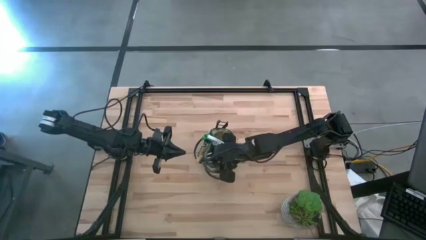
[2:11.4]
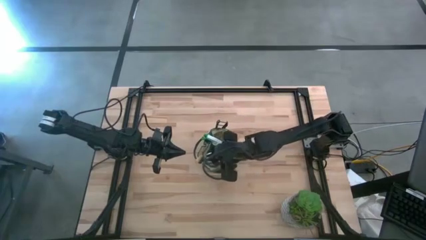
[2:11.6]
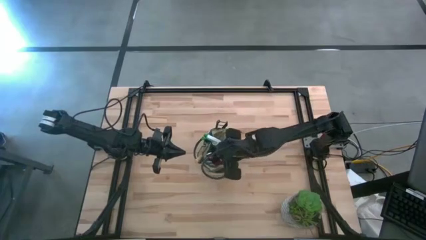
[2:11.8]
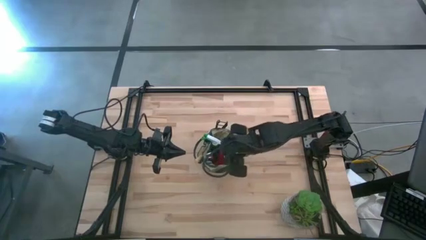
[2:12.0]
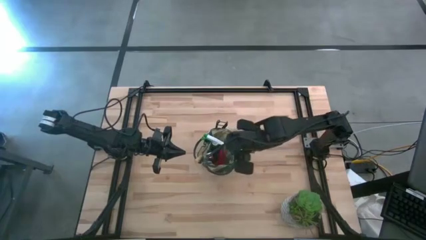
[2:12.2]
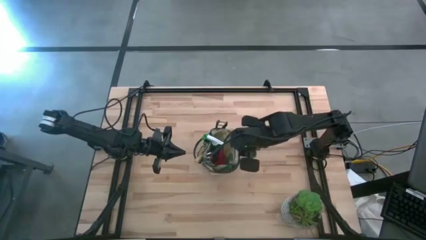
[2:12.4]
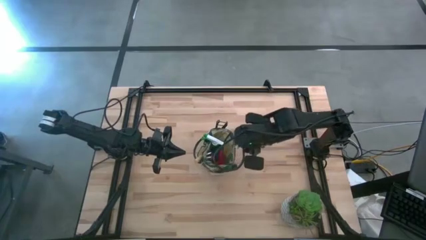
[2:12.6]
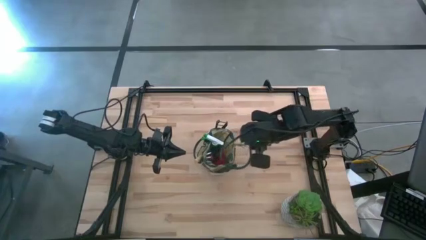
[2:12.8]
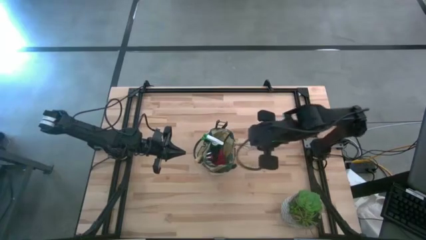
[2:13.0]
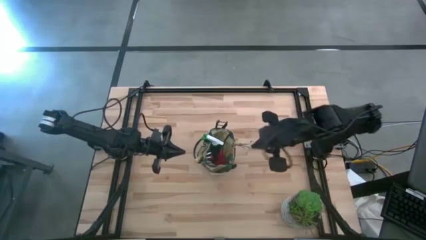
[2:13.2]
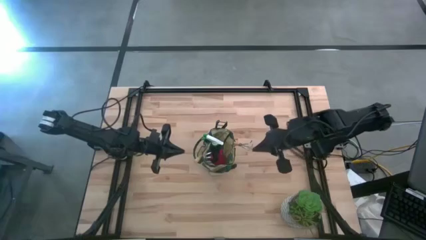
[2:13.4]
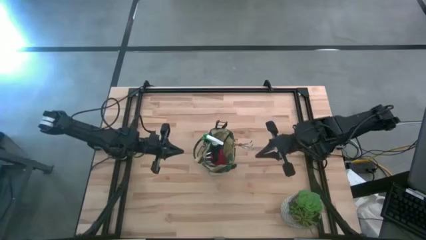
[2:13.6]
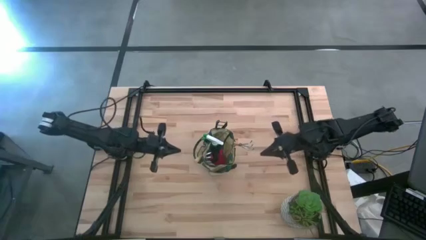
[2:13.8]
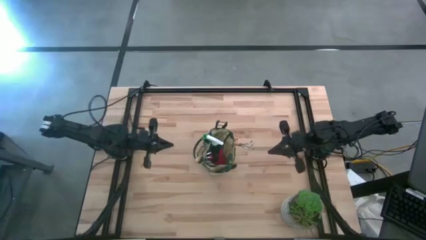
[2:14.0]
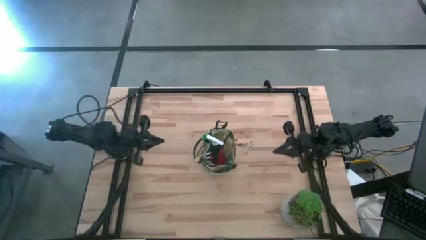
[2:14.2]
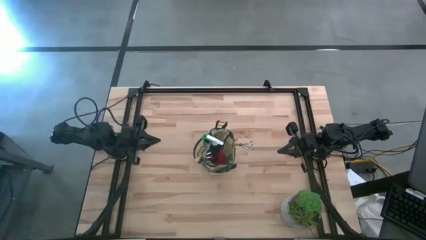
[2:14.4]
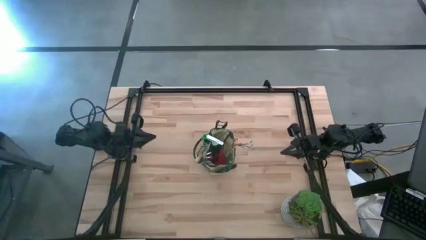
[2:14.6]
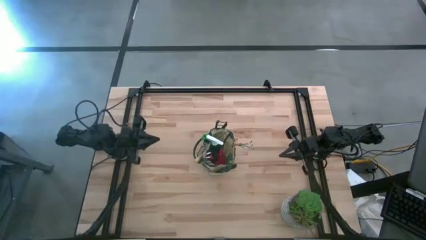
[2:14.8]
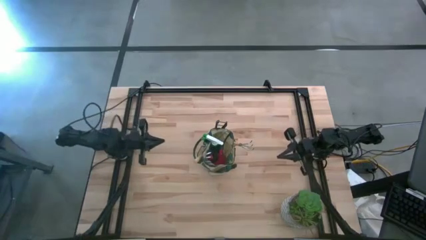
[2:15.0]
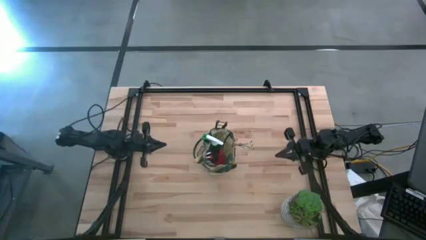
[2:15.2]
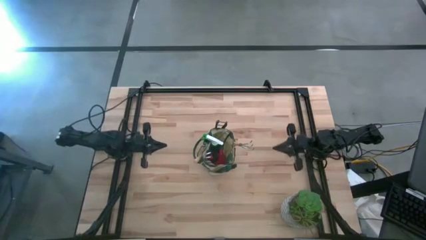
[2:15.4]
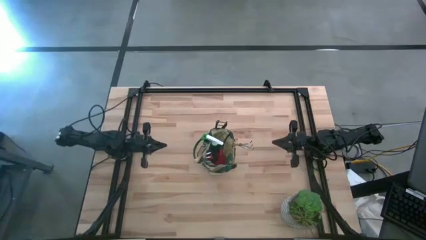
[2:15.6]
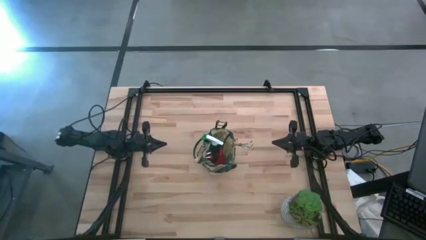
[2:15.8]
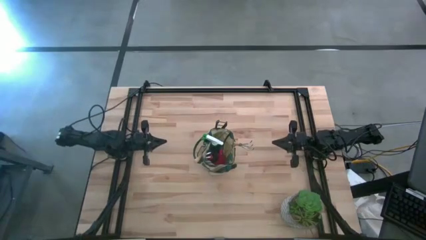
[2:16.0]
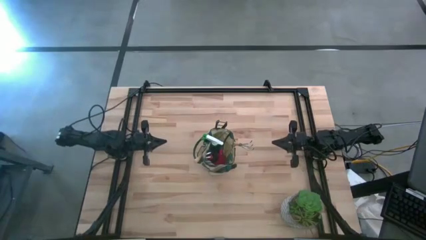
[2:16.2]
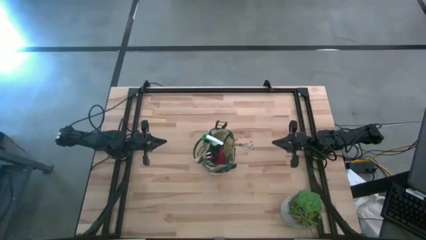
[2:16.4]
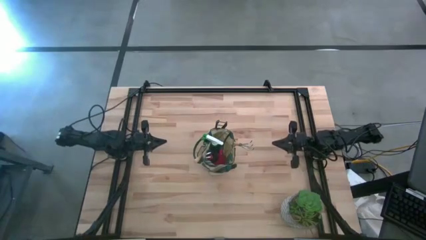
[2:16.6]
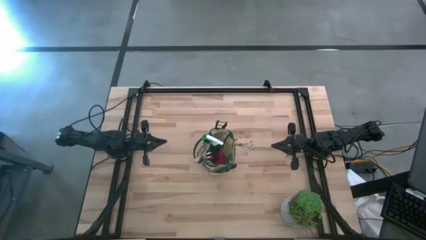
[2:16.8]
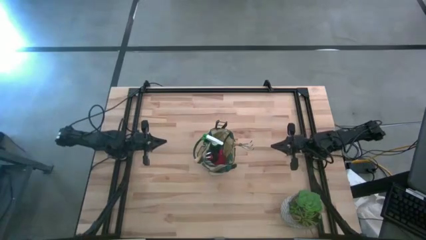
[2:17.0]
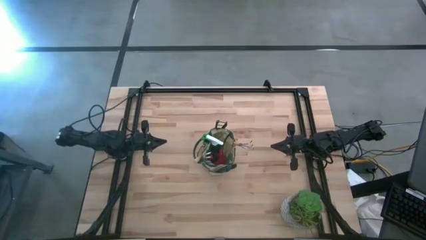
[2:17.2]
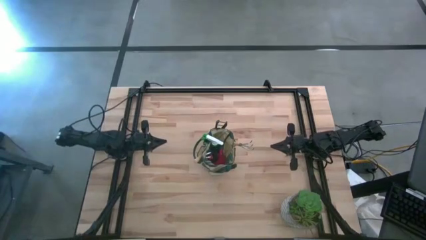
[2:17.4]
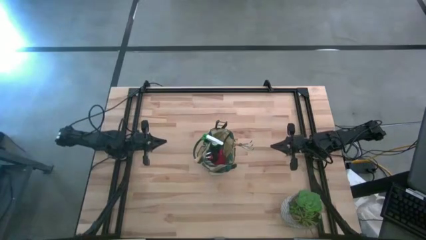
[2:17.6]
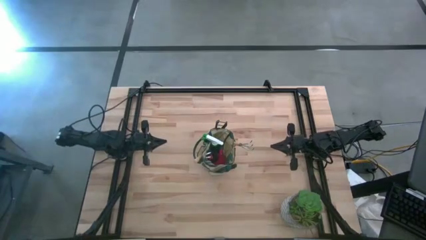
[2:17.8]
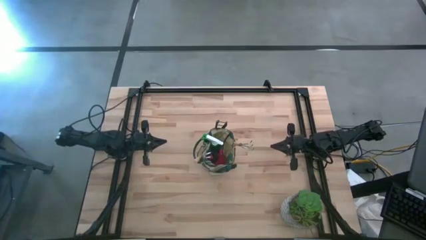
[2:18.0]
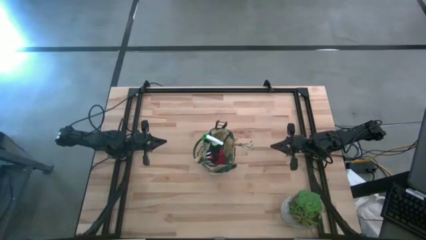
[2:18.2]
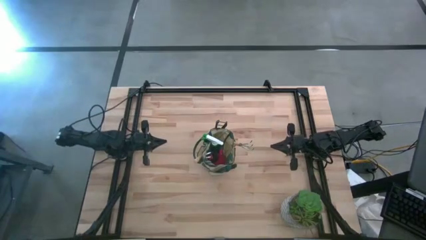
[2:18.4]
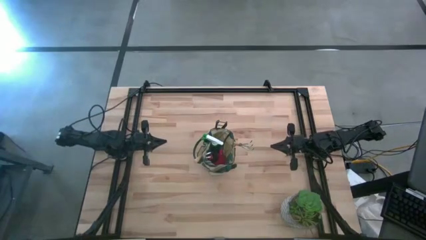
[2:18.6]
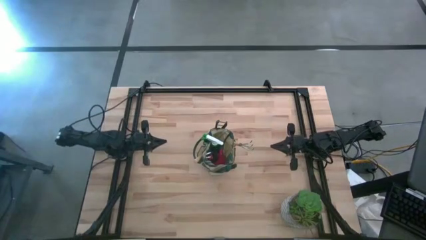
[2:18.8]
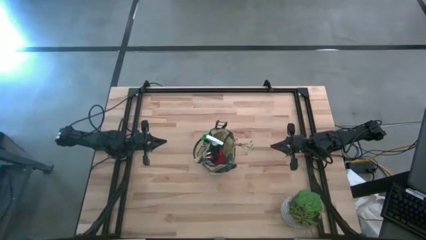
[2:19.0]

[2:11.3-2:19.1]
Task: Pick & Place Garden tools in Gardening bag
Return to Home Position

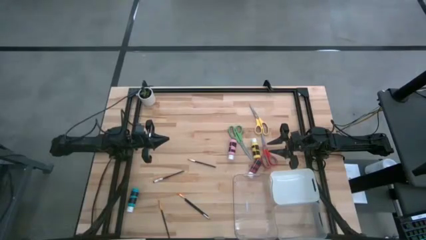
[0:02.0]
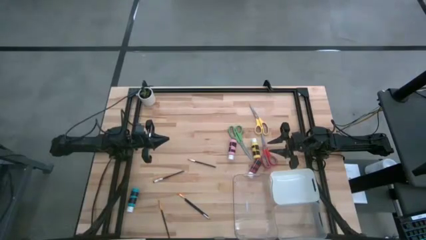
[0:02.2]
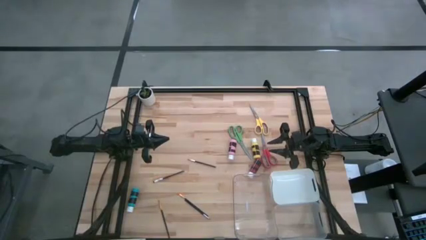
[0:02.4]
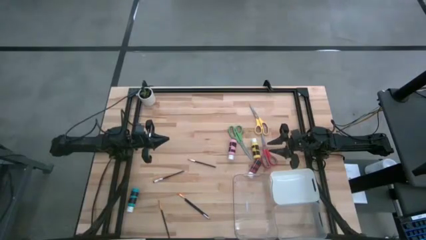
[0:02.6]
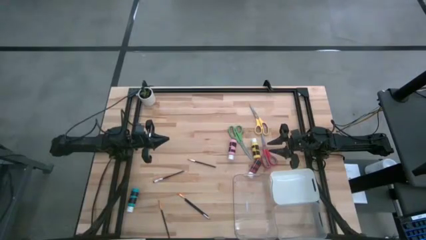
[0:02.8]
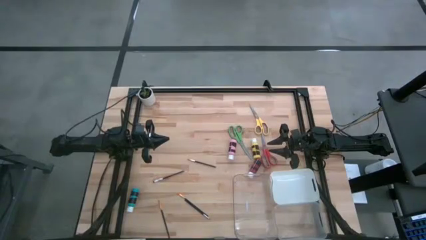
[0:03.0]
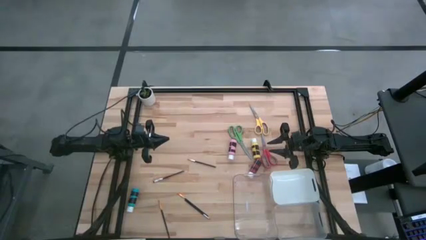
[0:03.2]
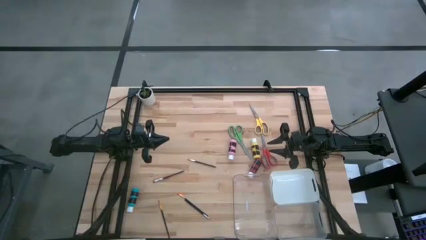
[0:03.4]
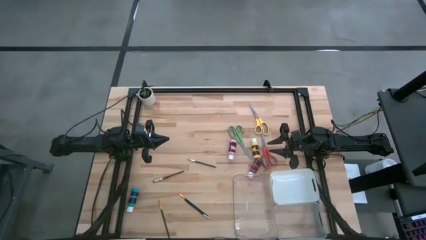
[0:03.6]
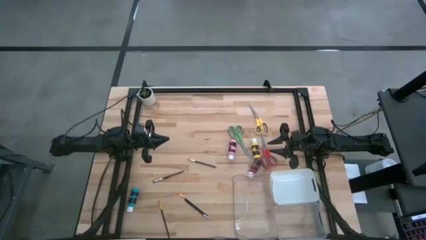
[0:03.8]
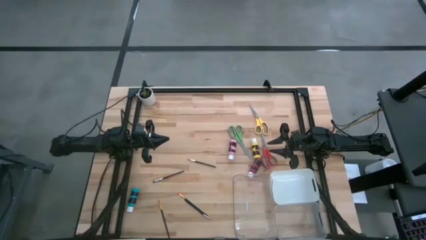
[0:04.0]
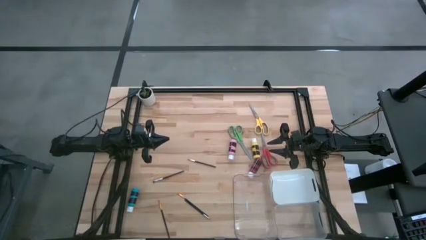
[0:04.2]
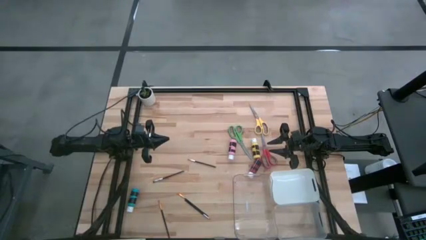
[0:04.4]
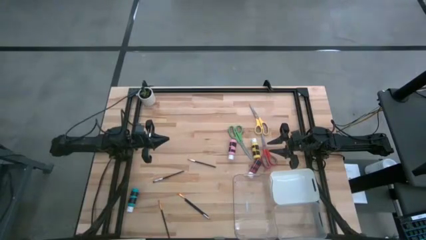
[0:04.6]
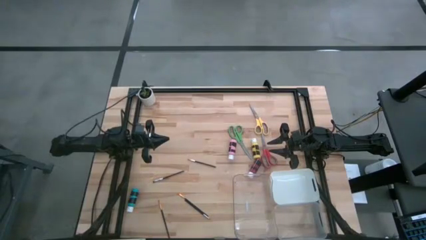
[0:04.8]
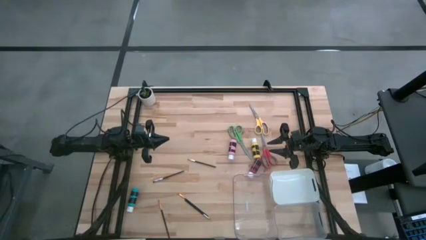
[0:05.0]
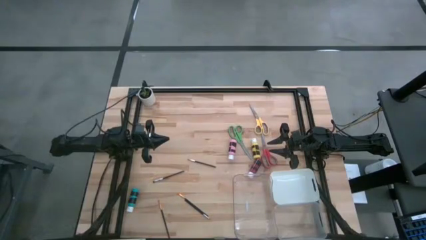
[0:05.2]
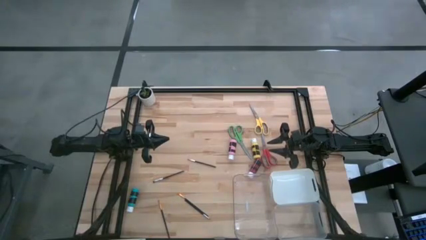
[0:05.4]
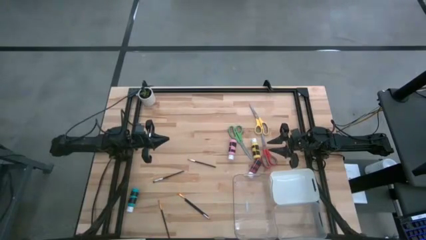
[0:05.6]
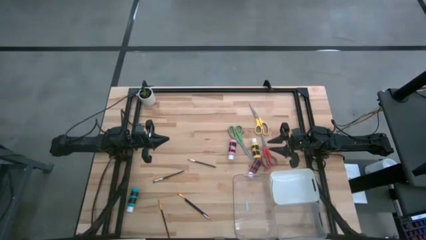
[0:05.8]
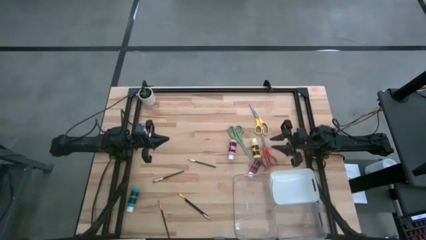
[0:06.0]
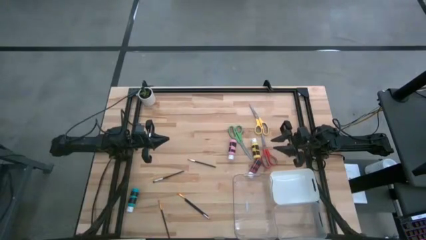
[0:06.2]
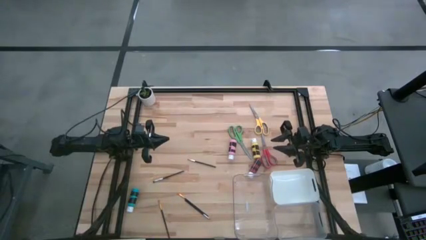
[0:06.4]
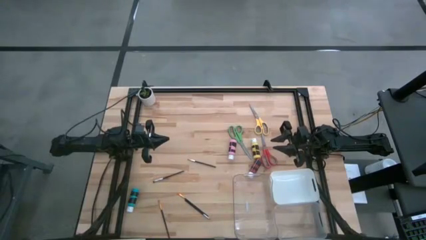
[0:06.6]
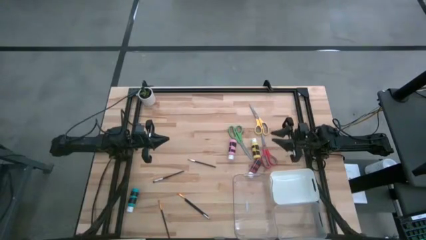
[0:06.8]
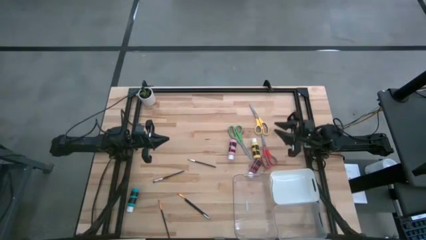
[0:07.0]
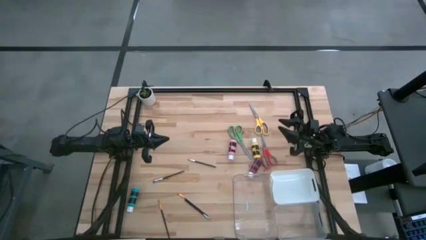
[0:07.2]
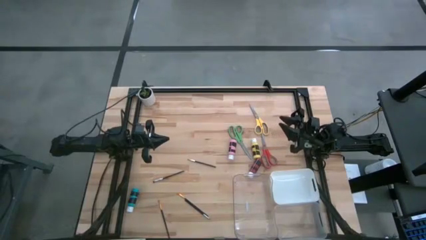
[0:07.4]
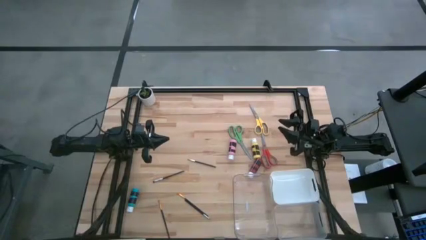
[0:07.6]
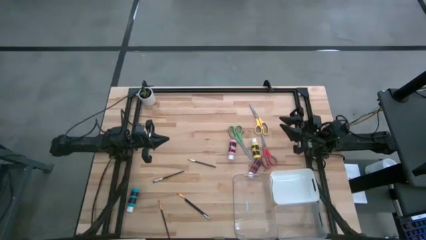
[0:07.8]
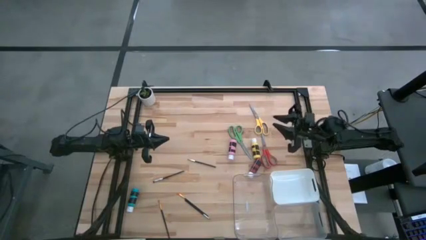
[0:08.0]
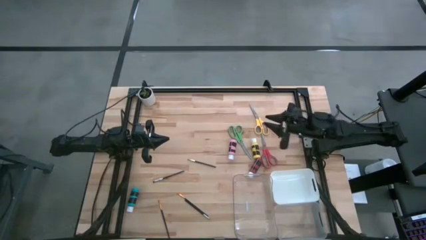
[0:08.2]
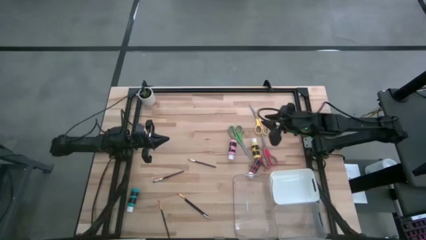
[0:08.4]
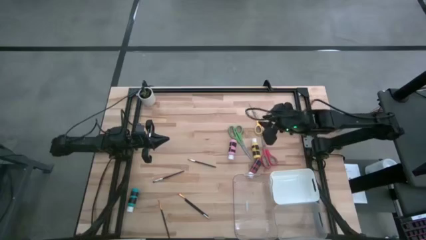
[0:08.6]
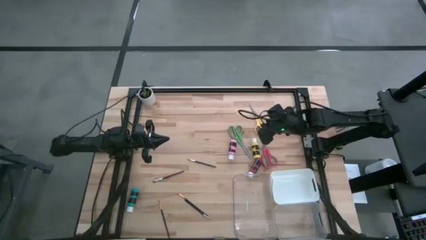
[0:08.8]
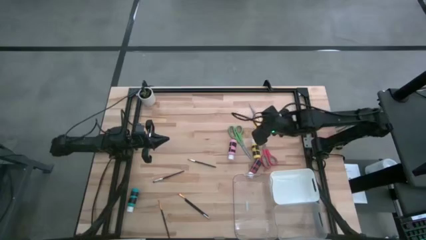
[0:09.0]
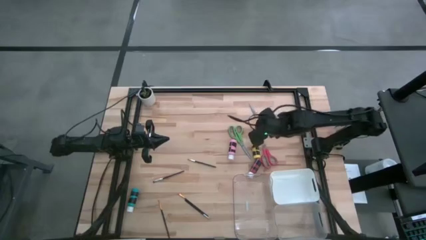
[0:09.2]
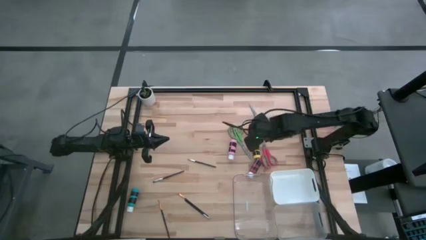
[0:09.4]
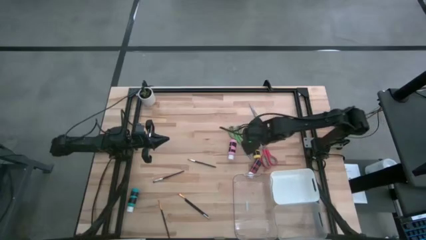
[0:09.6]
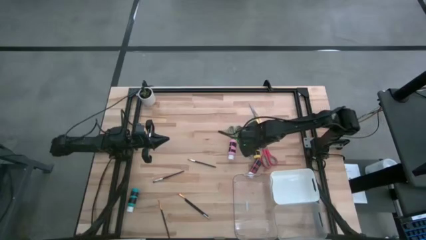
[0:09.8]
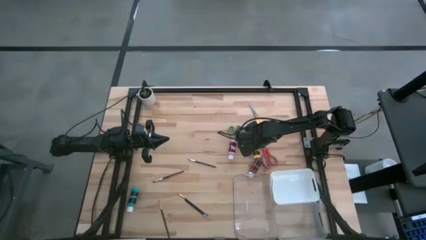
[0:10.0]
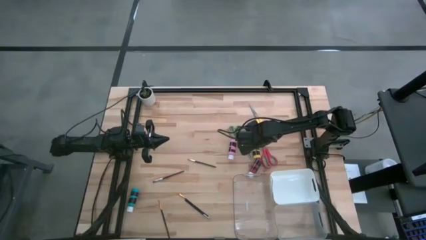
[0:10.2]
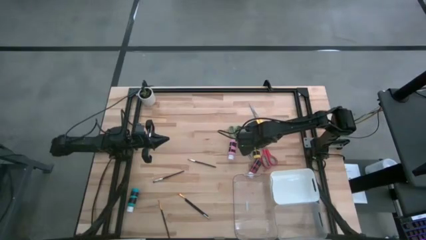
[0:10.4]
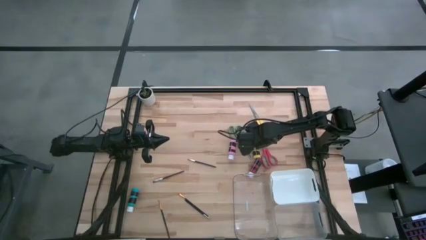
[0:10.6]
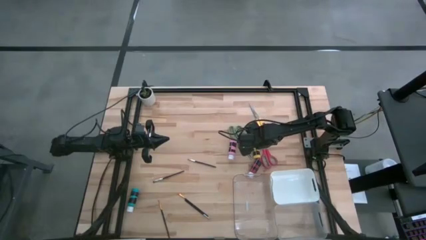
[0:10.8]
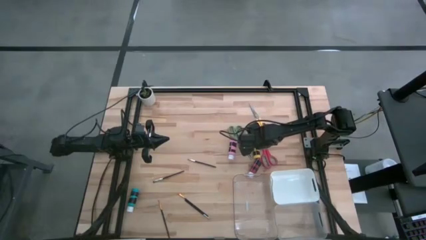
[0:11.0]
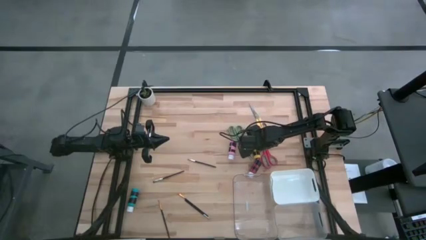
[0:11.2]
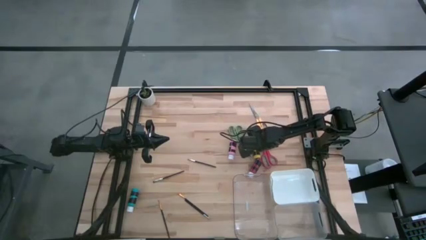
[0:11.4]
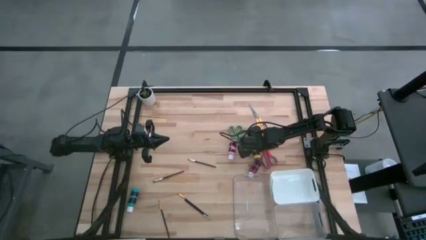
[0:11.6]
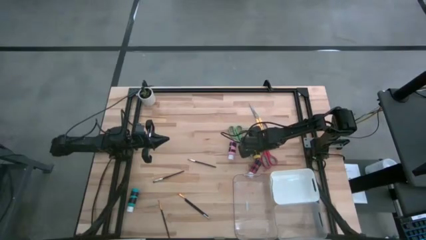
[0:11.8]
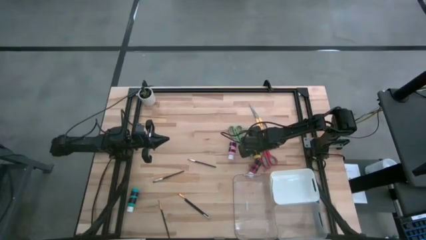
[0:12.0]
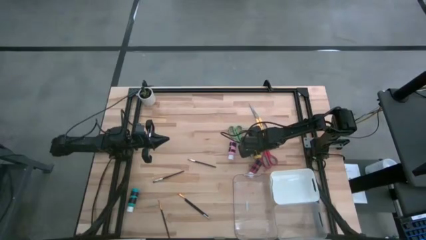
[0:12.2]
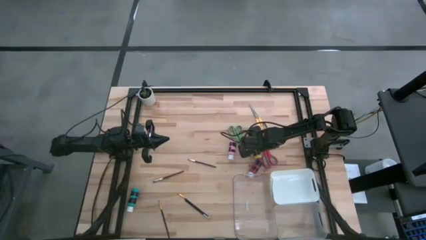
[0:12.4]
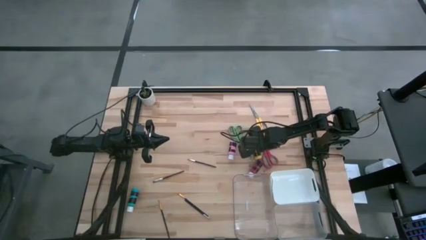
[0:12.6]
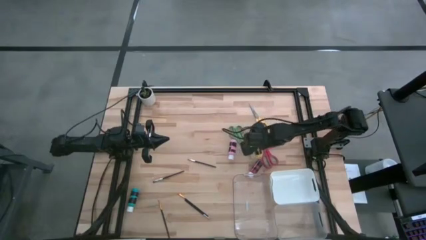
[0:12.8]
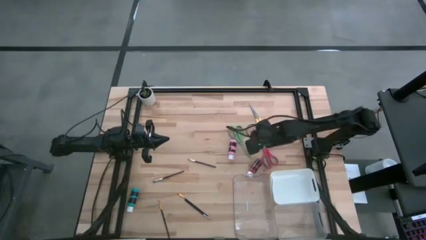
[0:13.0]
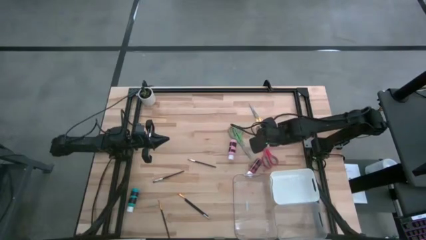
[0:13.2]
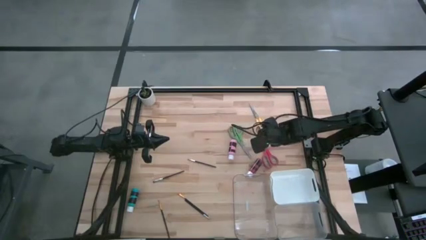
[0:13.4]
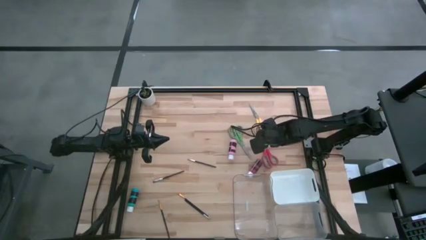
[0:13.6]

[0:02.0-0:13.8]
Task: Pick & Place Paint Supplies
Put the yellow paint bottle into the white bin
